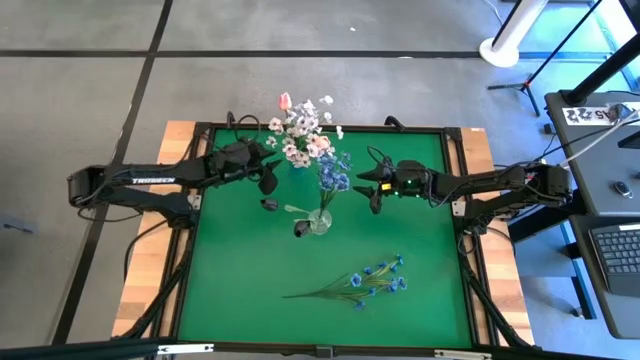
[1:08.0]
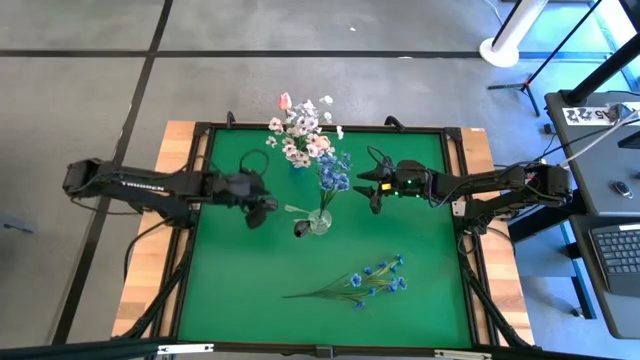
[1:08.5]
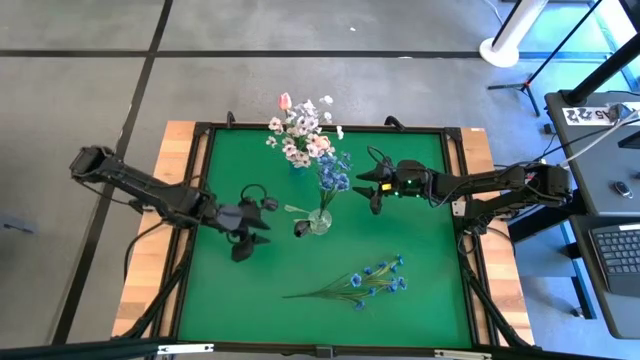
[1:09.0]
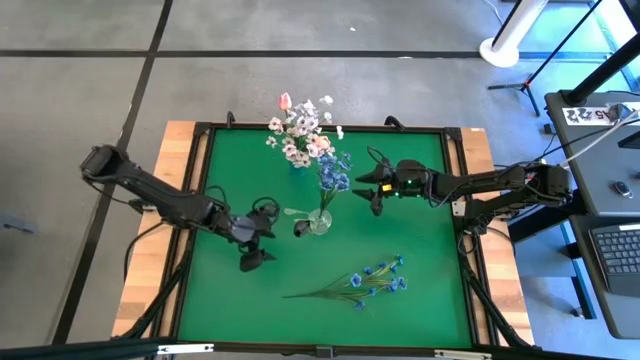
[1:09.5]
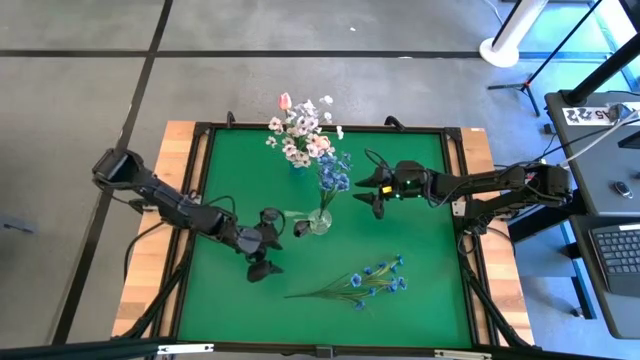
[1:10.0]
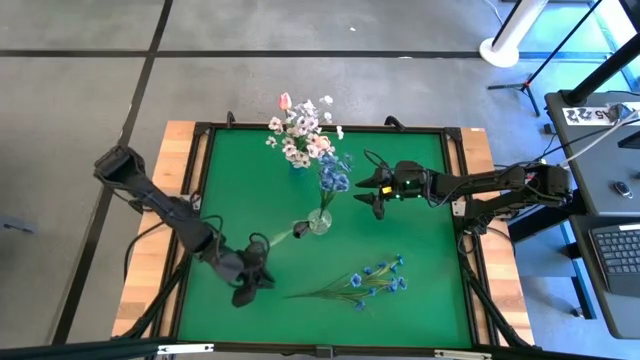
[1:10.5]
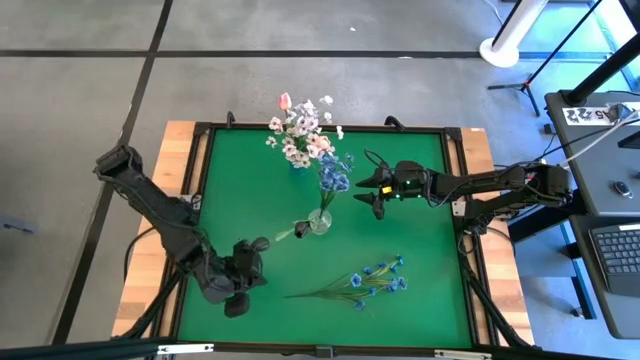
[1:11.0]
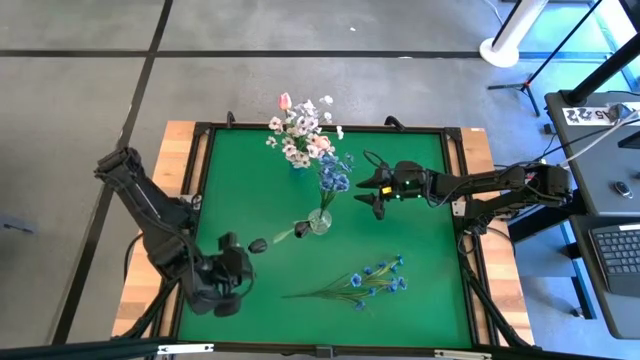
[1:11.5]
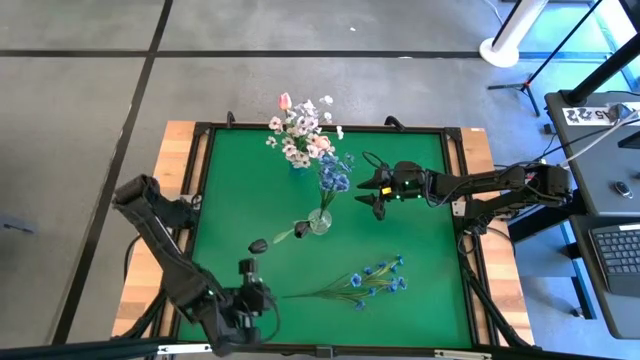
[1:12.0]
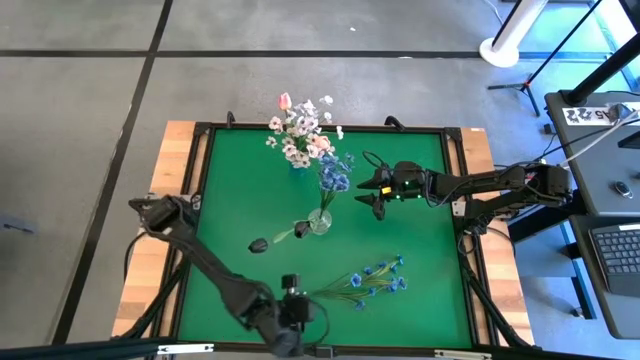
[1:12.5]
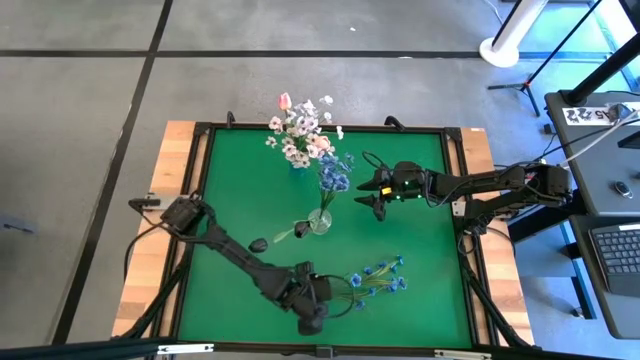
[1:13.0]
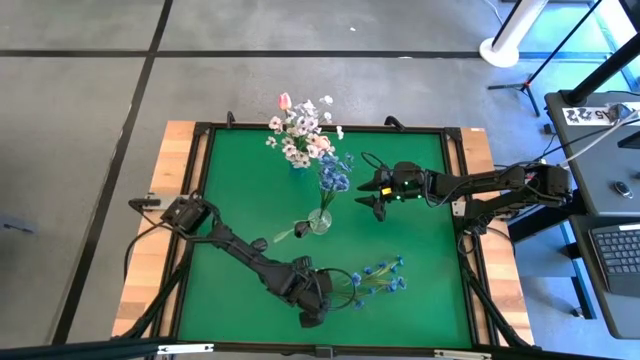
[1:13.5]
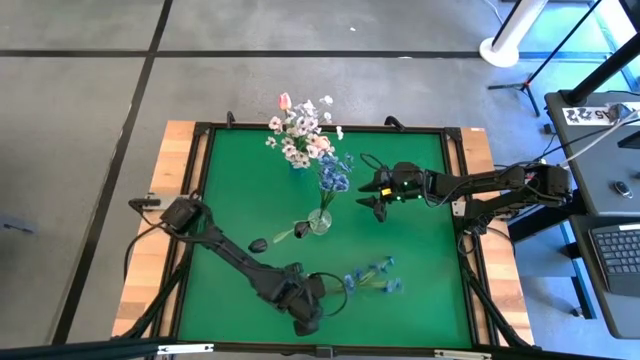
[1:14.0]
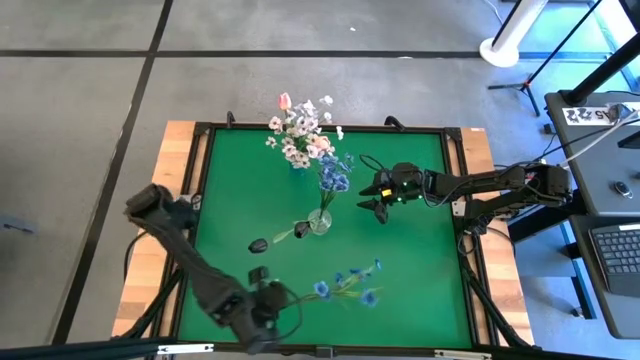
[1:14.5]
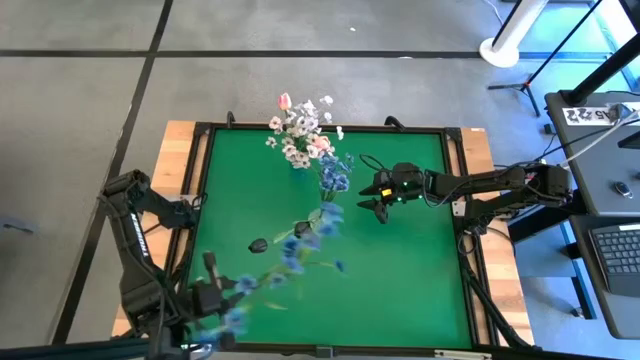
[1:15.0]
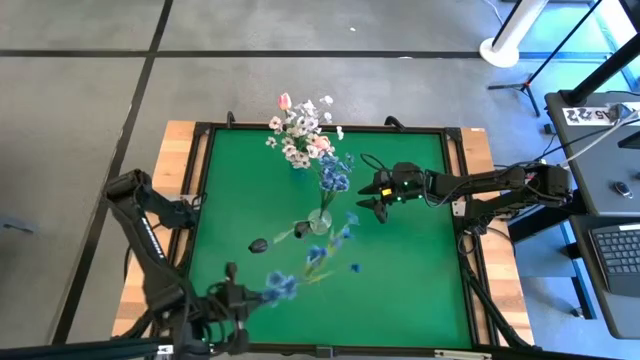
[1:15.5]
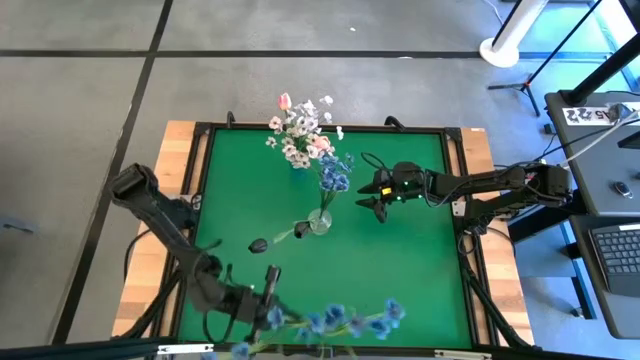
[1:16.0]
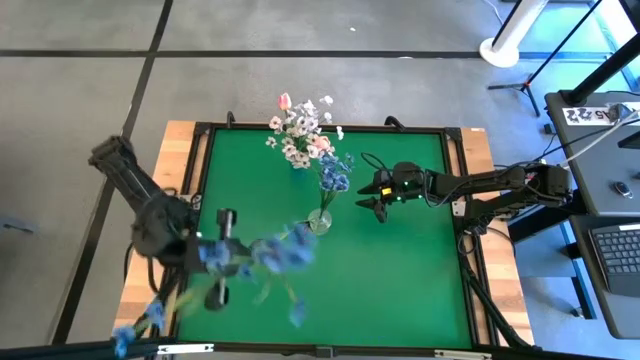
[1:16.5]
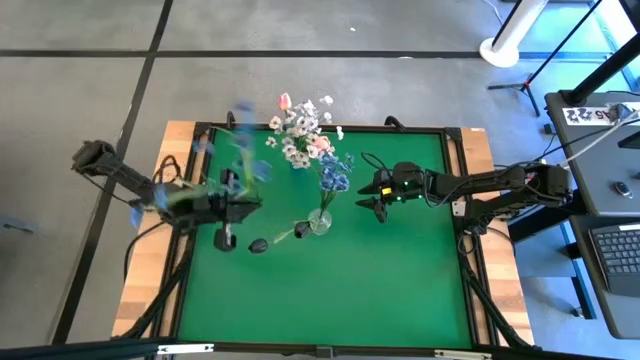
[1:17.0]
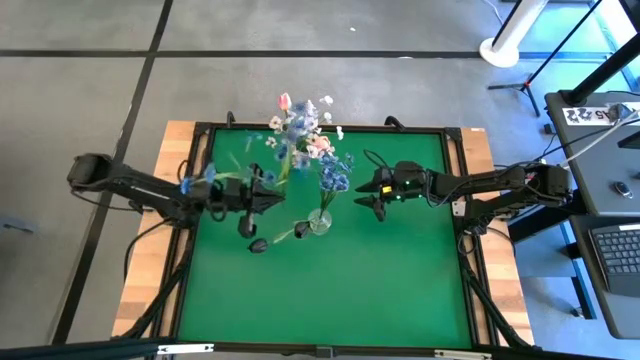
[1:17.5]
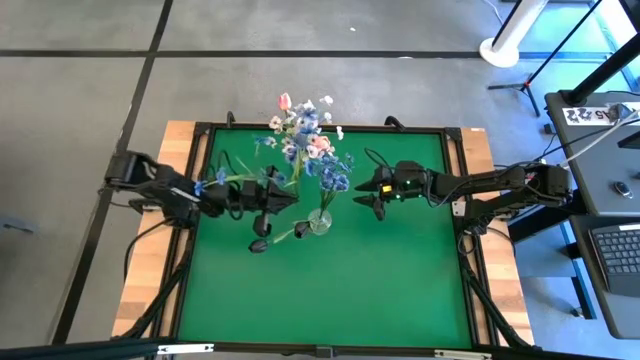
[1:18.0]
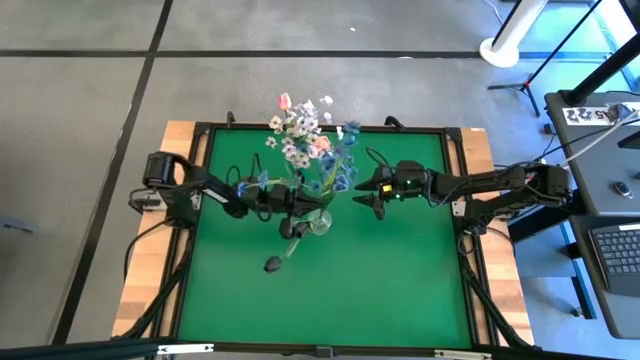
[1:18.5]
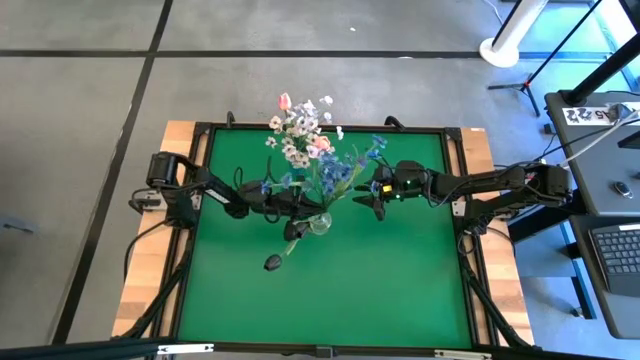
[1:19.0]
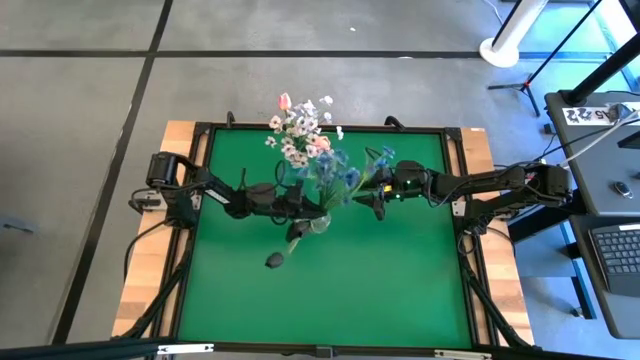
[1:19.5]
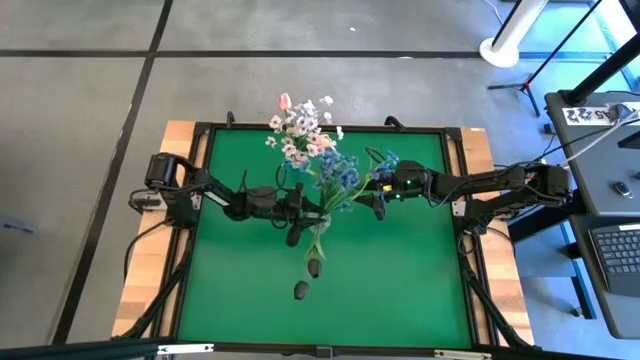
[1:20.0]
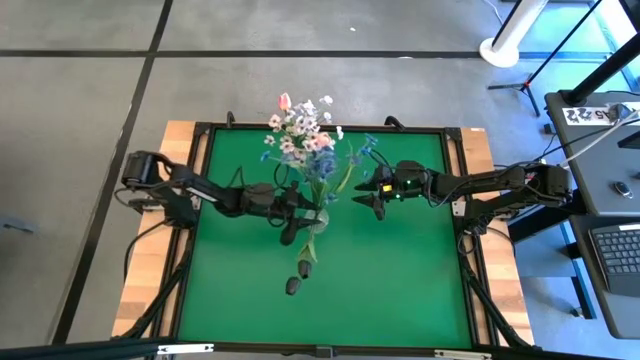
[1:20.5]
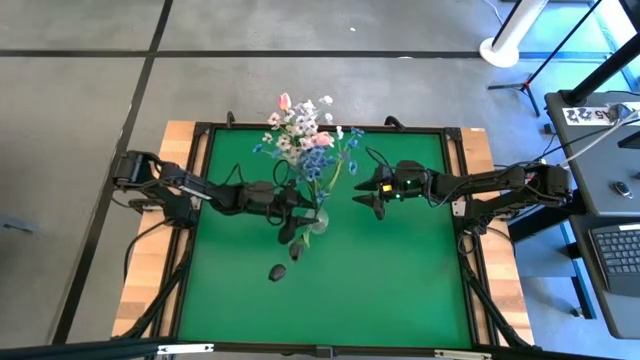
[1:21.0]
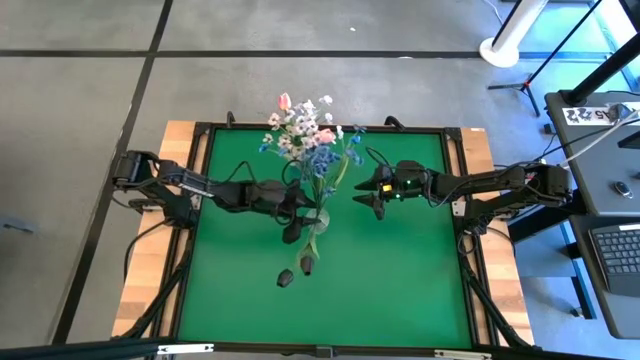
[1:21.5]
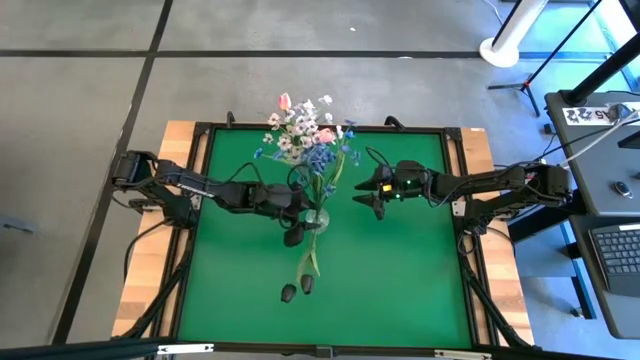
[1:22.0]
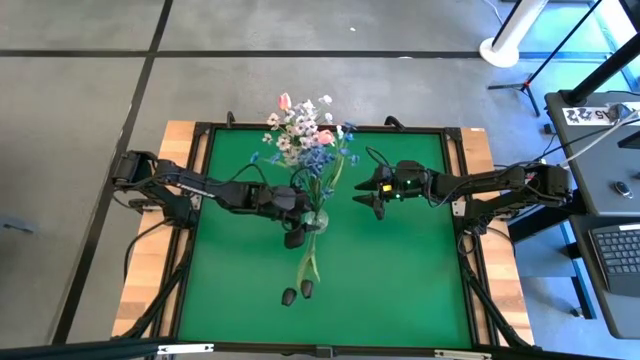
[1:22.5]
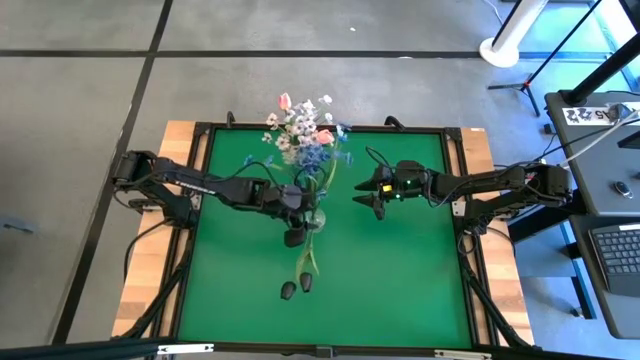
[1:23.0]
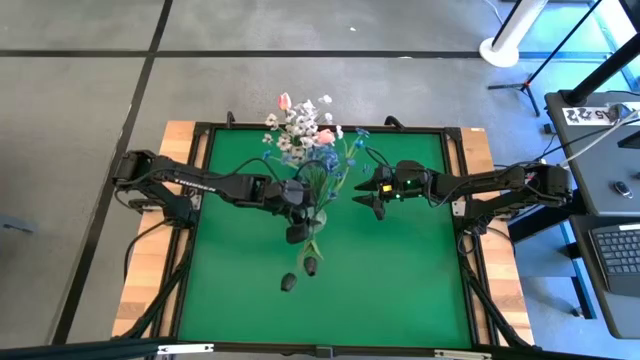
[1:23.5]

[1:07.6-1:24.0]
Task: Sort flowers into vase by color
Put the blue flowers into the transparent vase
